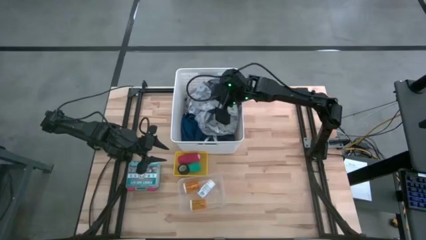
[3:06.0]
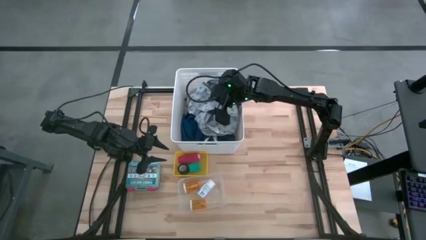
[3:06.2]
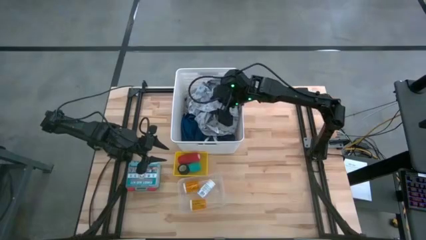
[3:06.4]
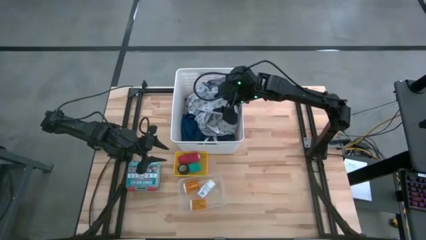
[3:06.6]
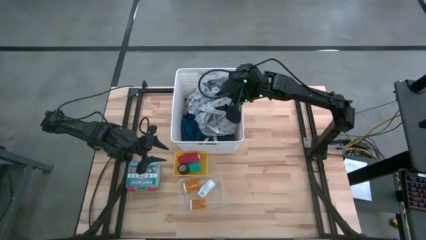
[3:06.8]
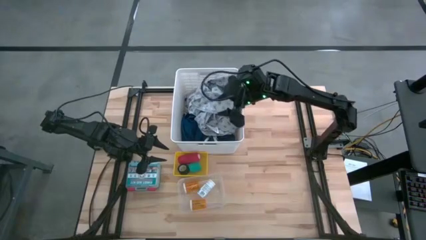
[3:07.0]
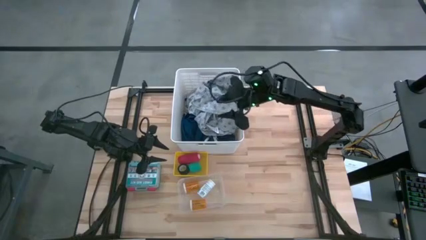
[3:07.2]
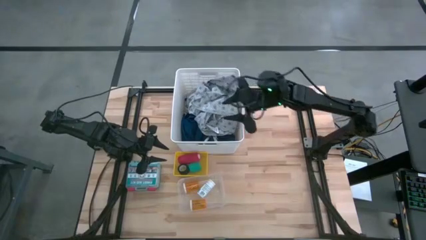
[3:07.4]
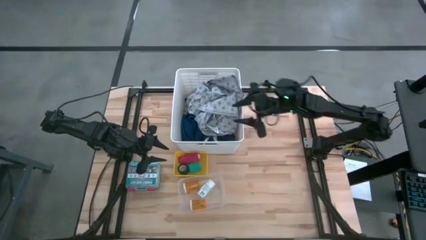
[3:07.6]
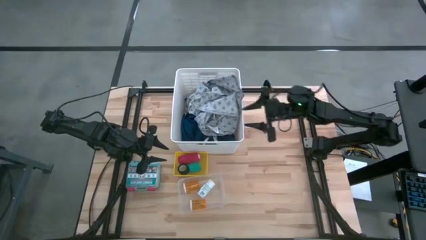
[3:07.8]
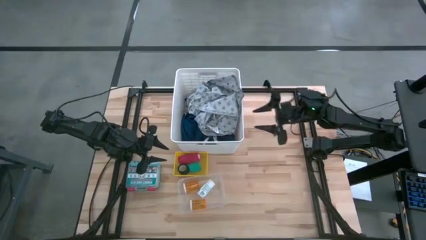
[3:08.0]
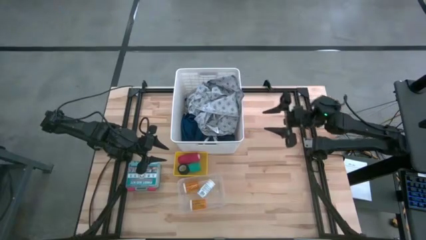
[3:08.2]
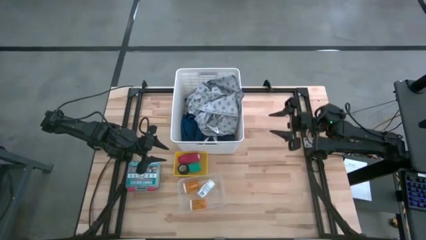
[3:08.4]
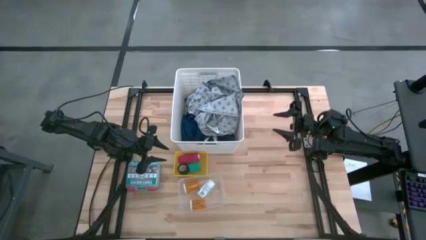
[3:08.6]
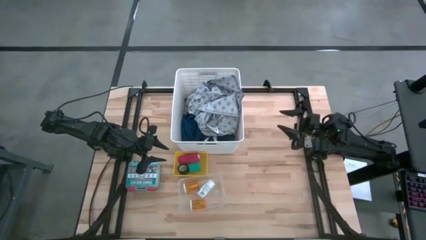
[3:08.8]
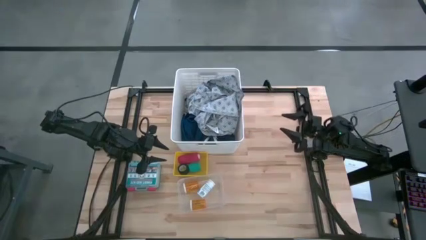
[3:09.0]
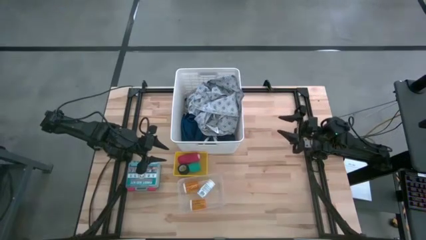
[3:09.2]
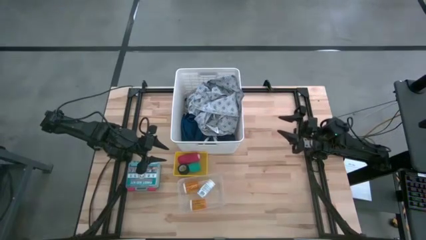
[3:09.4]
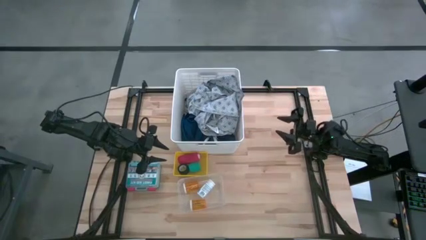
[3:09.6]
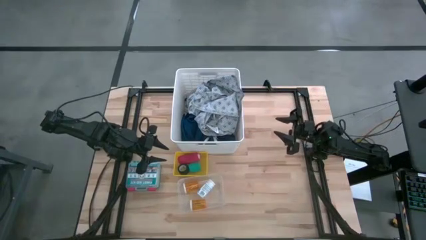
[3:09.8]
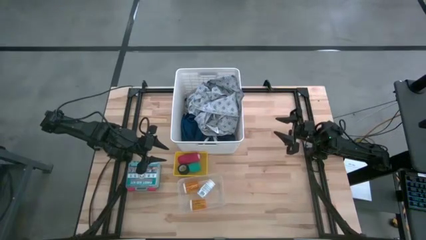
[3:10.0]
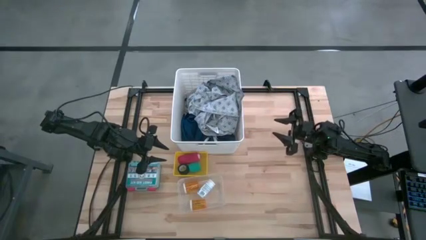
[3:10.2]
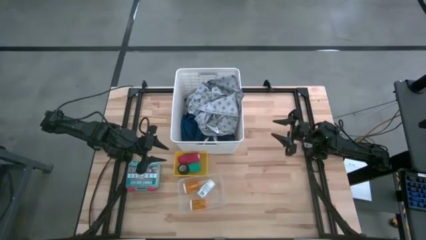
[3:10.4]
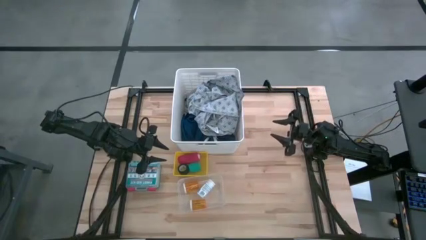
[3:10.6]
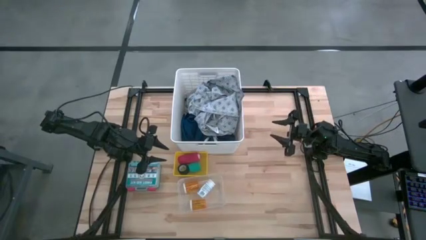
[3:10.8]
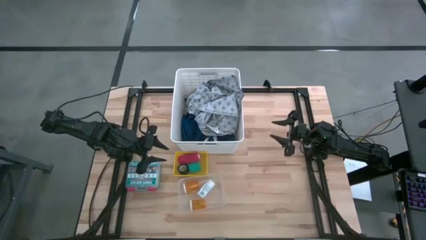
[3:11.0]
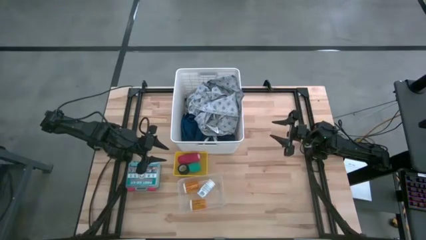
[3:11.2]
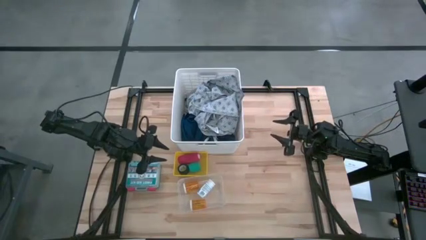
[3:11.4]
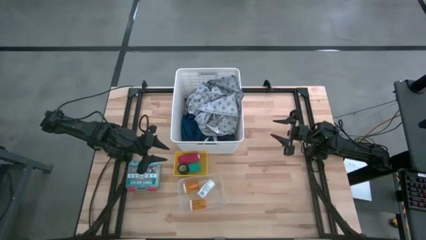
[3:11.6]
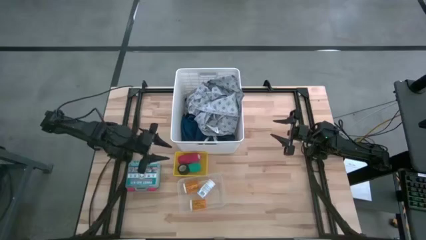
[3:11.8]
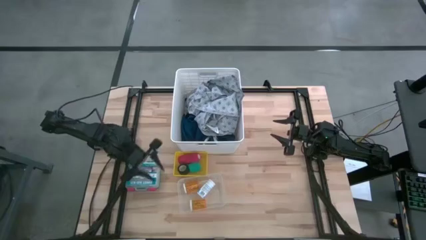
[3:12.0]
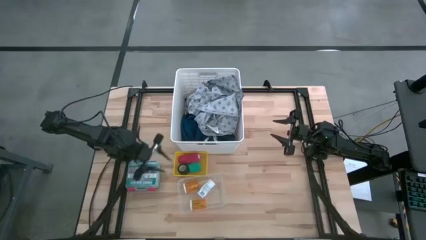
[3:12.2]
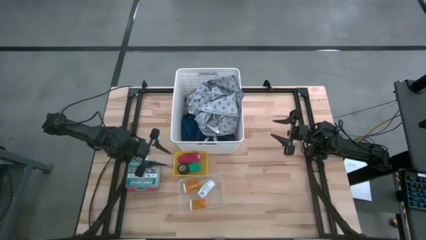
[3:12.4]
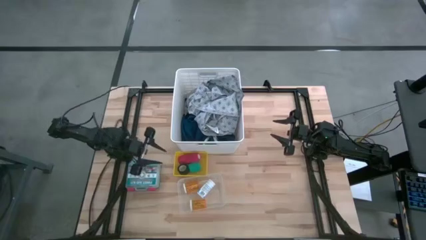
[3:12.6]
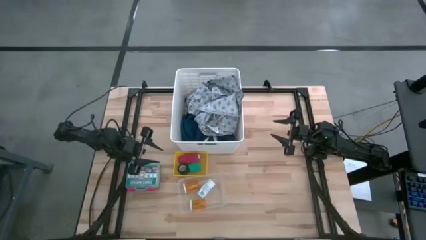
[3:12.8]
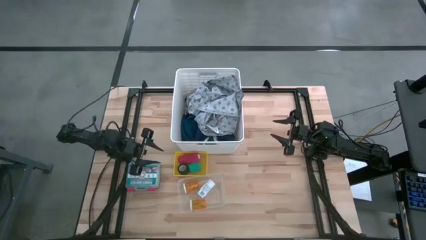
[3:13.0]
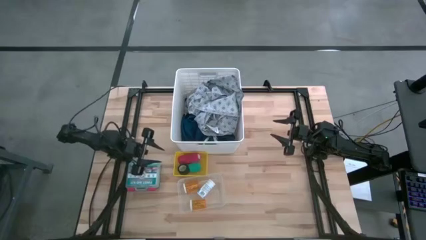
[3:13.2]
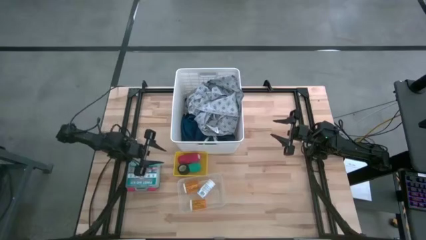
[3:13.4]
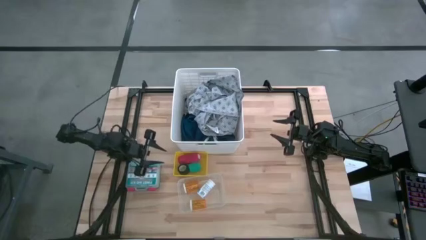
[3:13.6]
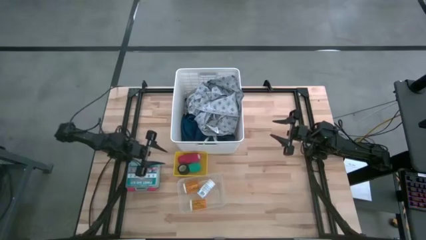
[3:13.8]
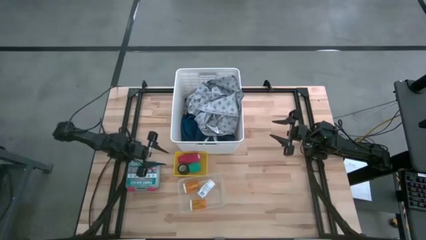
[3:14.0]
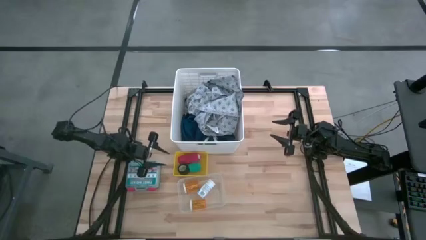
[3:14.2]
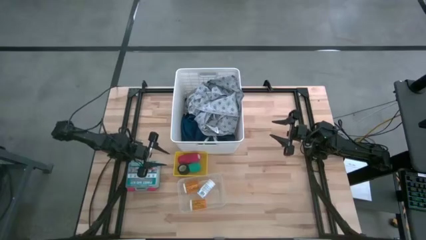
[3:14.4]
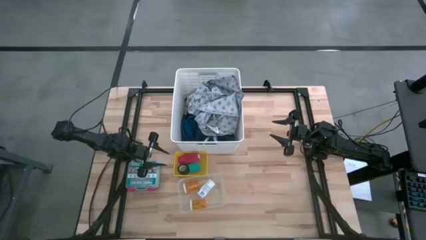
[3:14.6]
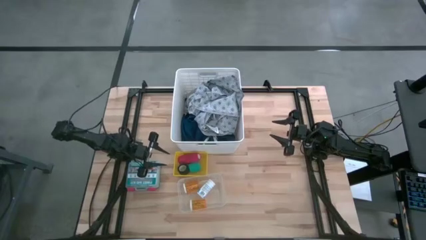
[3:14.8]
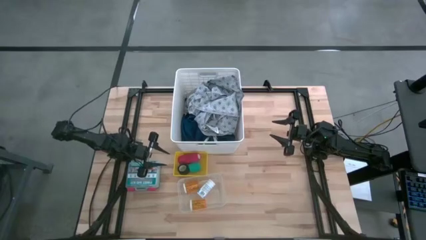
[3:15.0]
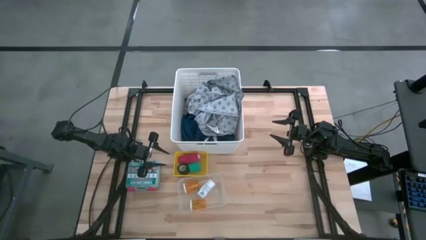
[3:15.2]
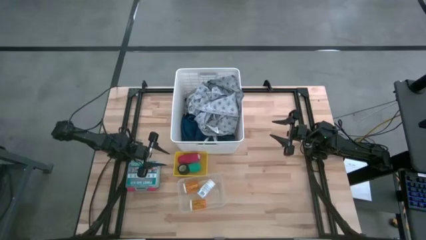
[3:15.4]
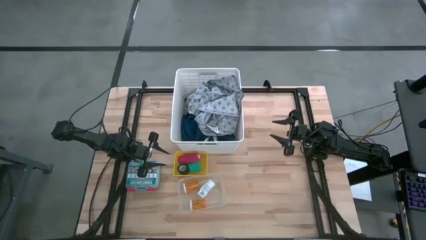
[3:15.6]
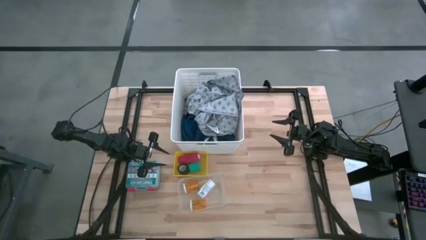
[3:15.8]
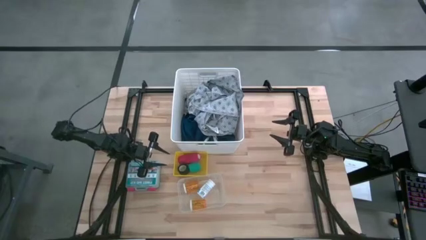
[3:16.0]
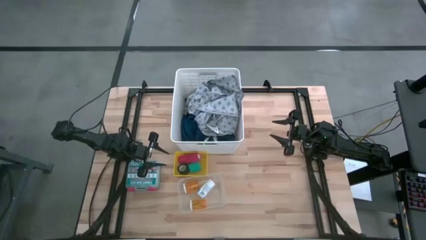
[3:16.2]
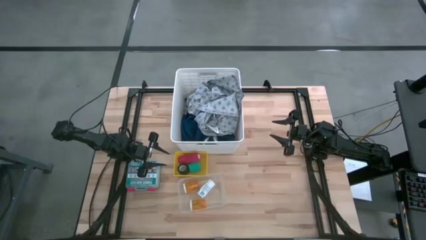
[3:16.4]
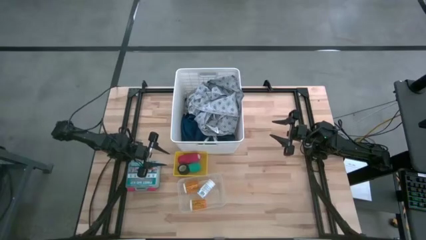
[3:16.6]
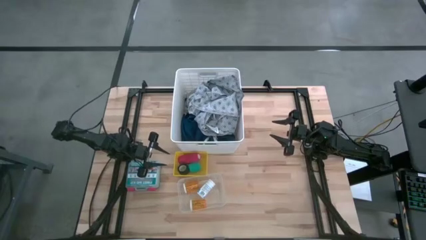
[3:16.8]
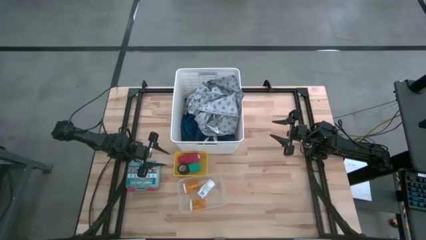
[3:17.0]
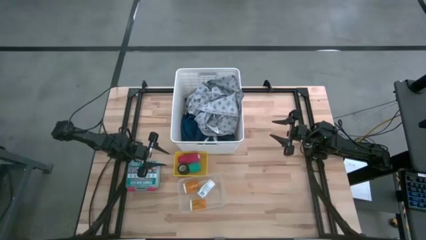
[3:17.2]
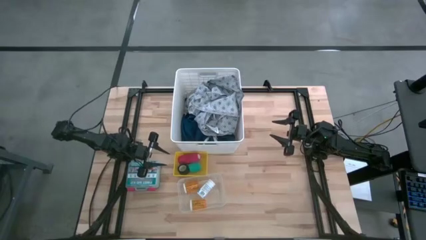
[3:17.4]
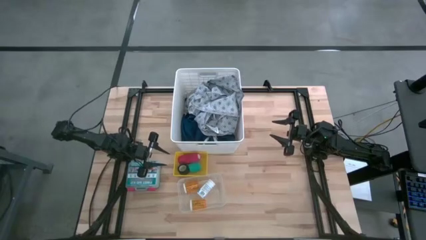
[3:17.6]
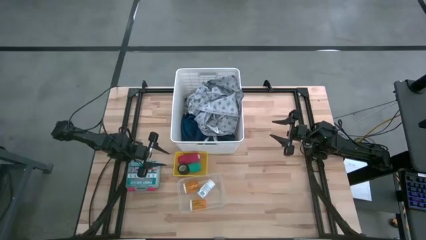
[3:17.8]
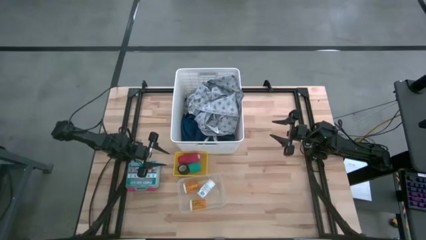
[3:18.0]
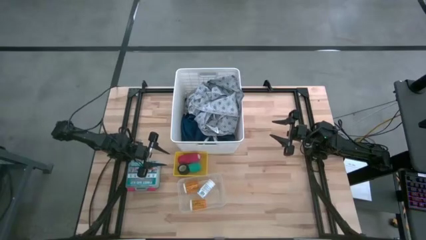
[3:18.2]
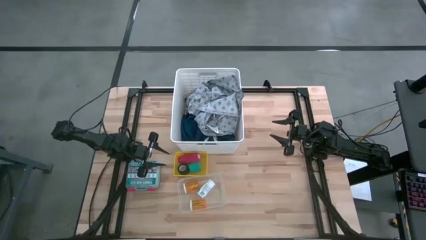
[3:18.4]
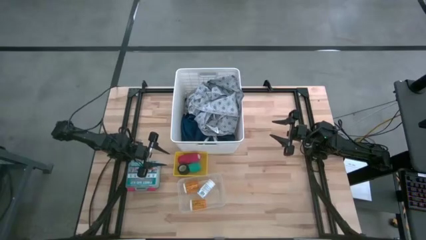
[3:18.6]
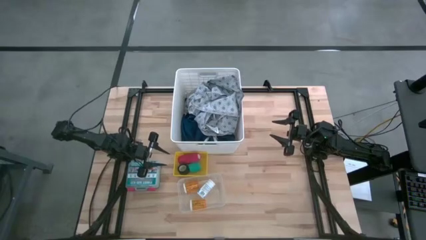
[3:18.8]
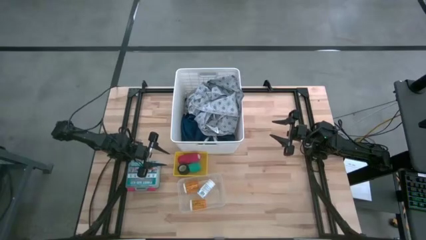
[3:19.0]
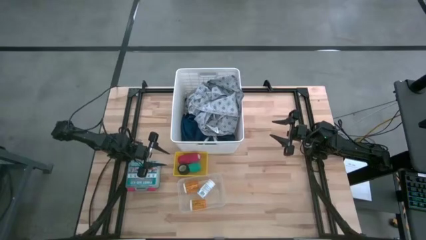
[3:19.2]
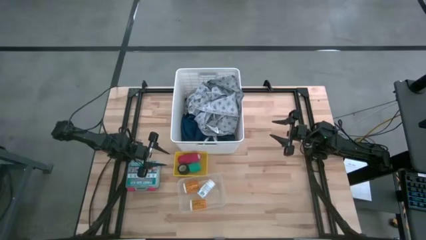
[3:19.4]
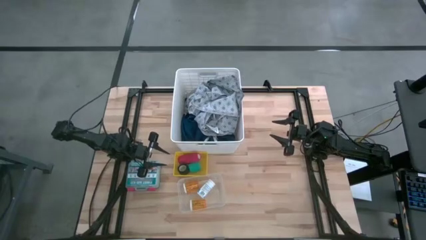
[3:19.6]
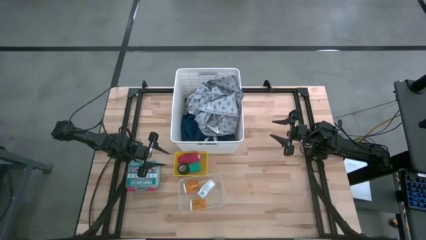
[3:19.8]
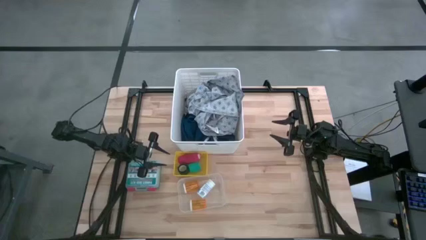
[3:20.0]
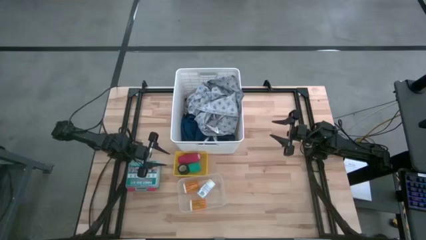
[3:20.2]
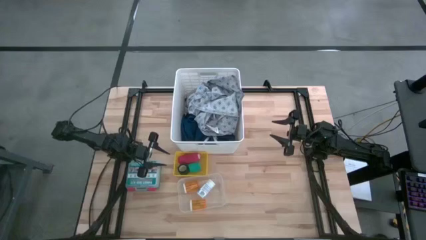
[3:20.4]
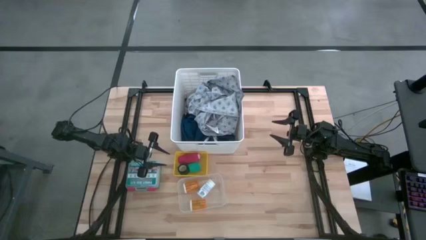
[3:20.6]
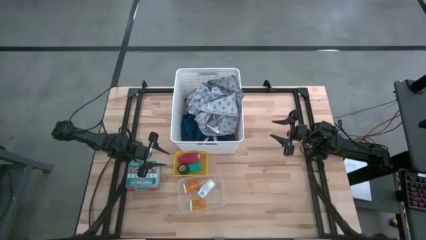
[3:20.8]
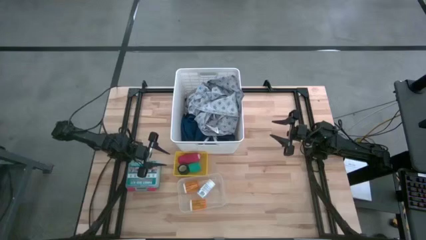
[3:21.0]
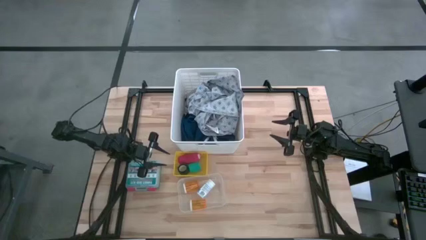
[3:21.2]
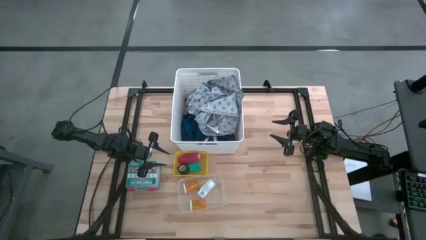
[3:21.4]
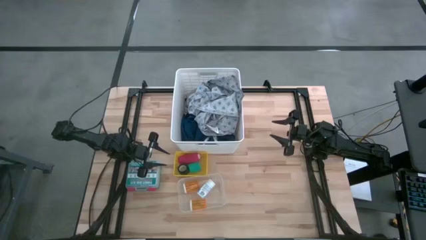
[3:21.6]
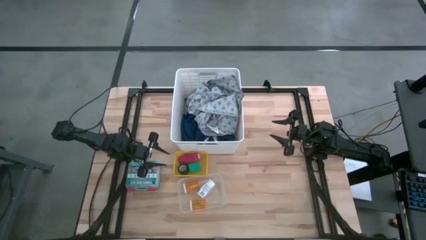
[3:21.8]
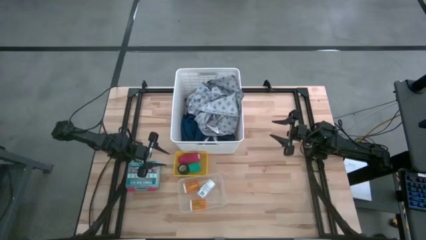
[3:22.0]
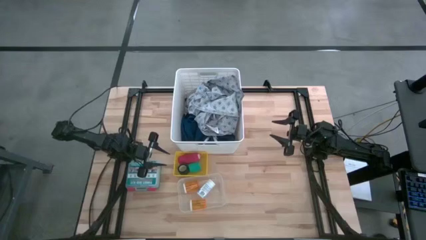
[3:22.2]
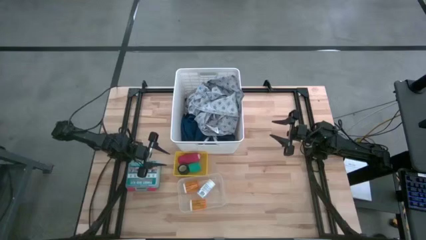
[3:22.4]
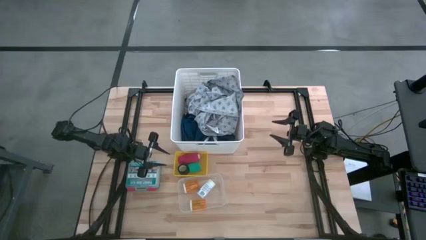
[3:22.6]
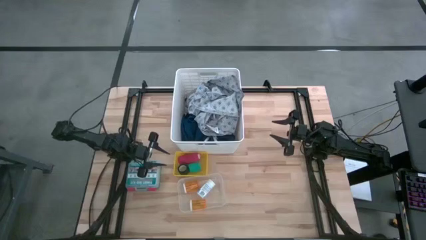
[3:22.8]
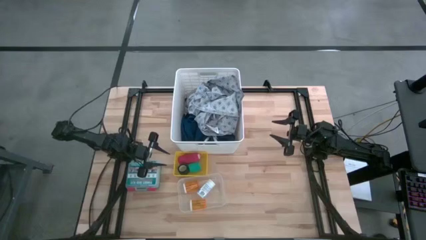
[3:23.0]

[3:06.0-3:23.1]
Task: Pick & Place Medicine items
Return to home position
